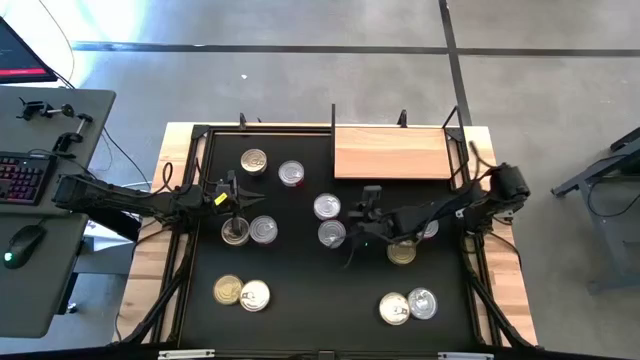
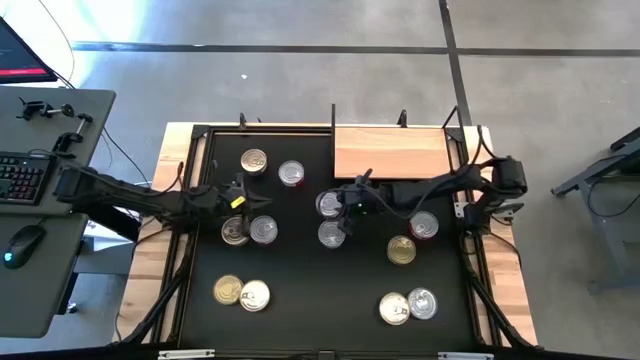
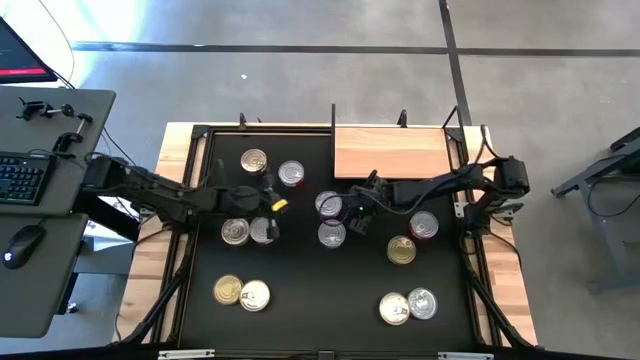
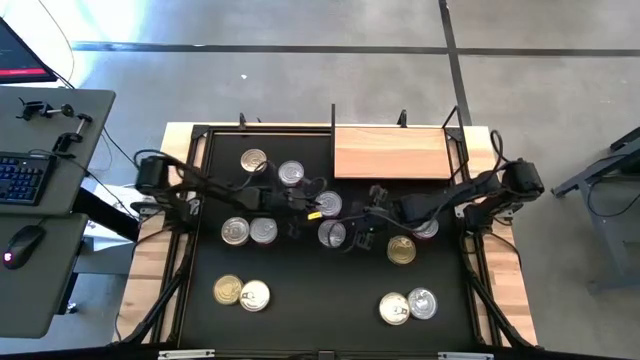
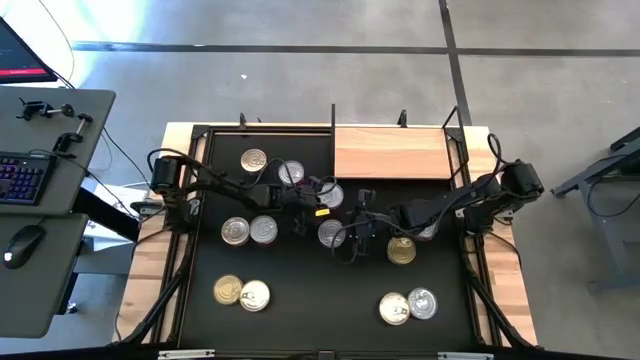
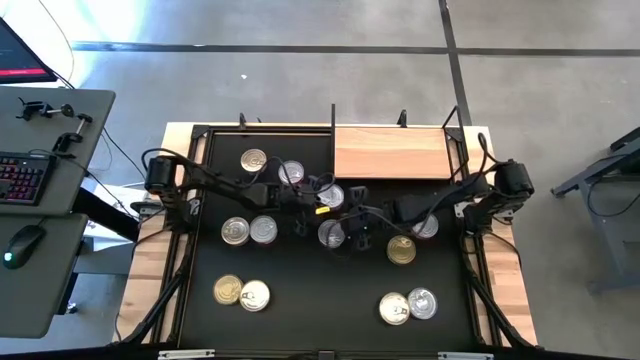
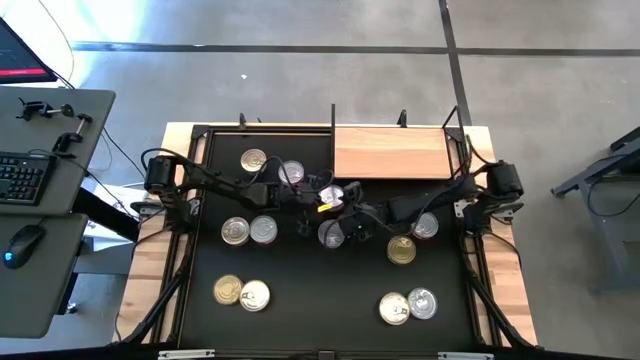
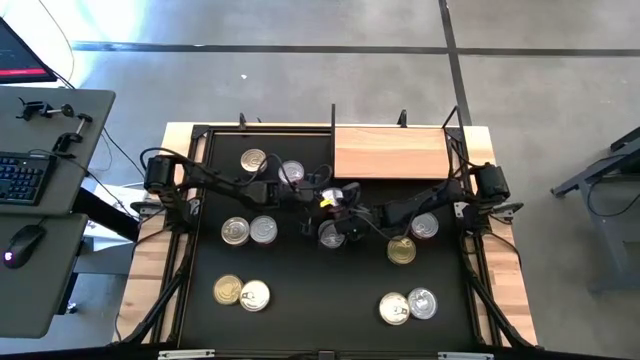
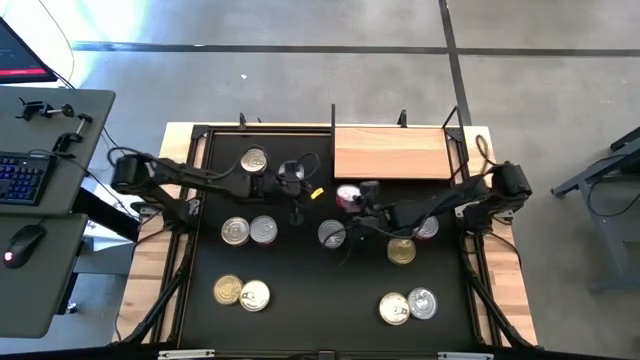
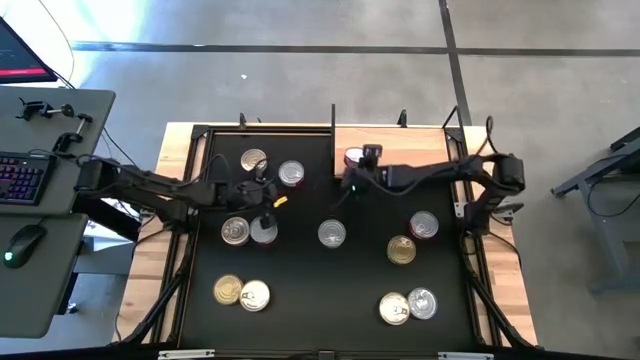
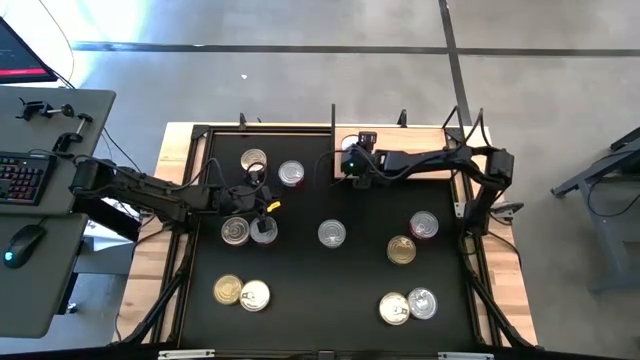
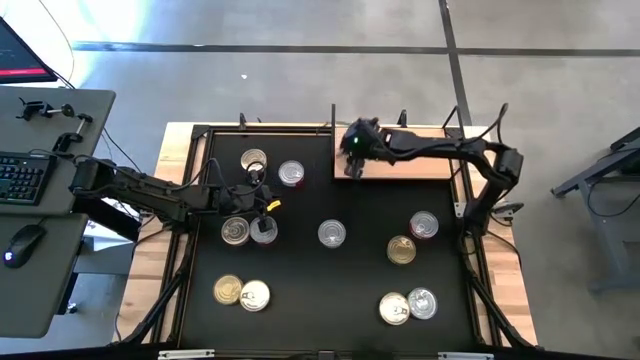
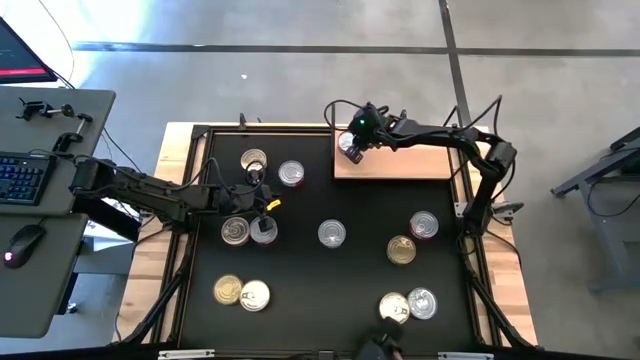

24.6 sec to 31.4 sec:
Task: Stack canned seafood by type on shelf
Put the red tuna can on the shelf

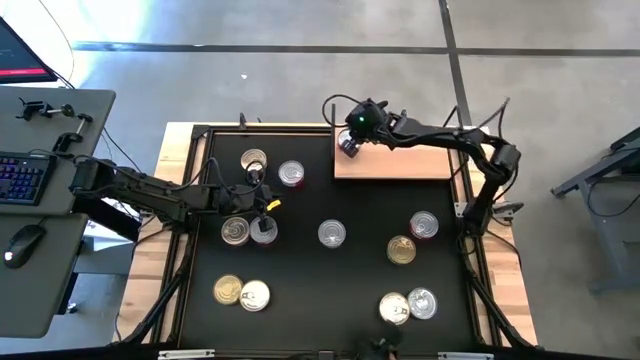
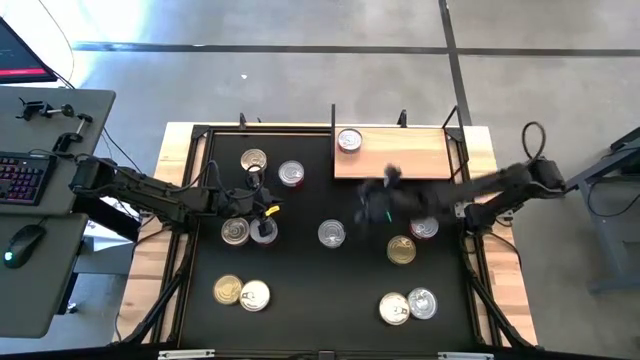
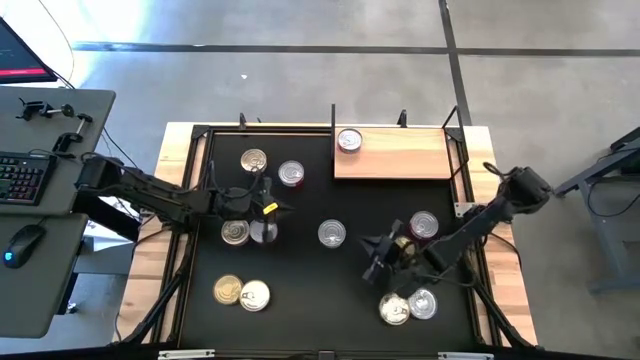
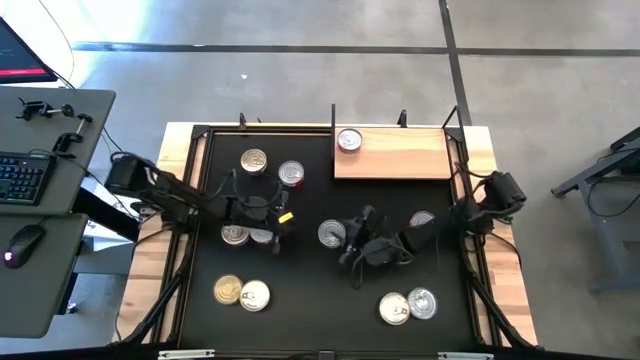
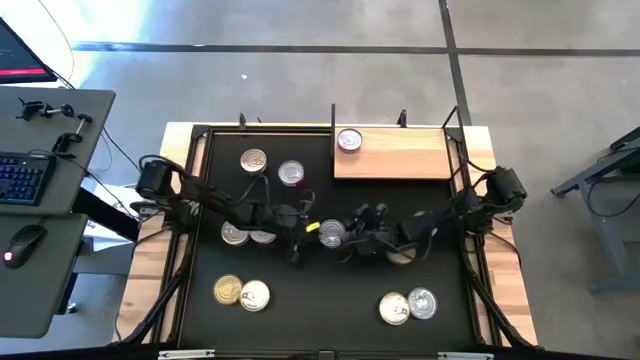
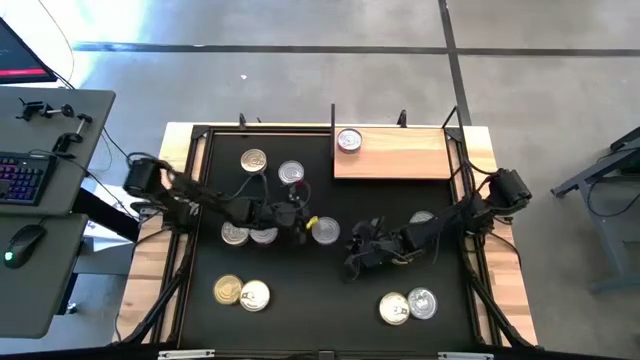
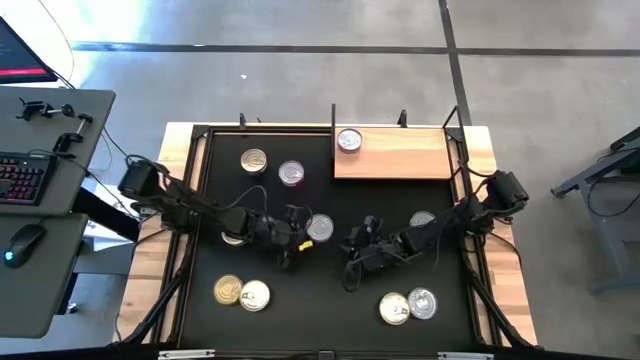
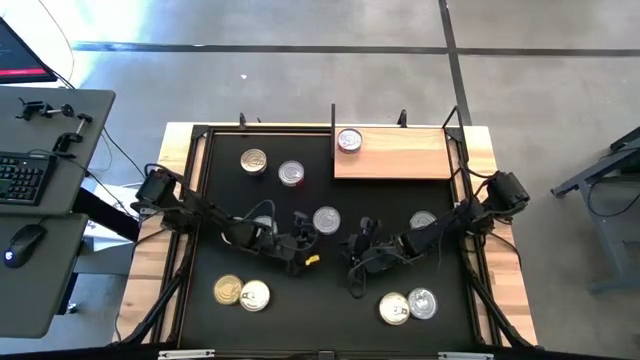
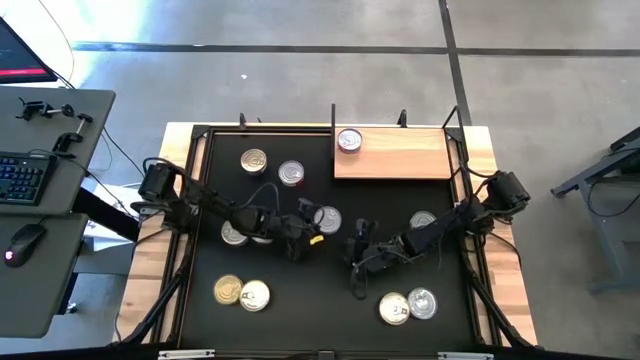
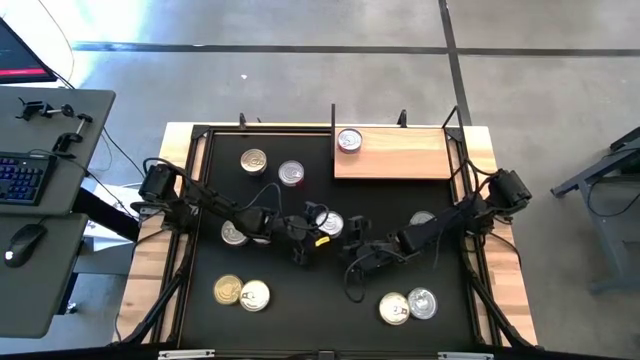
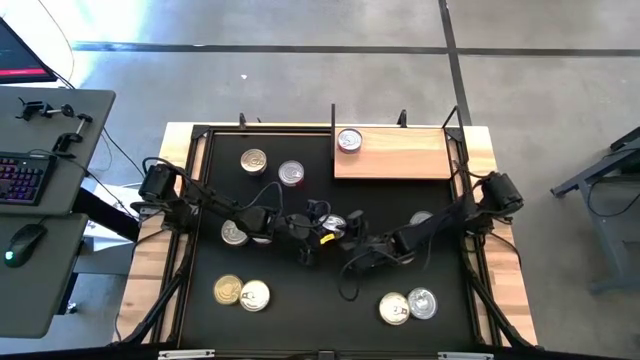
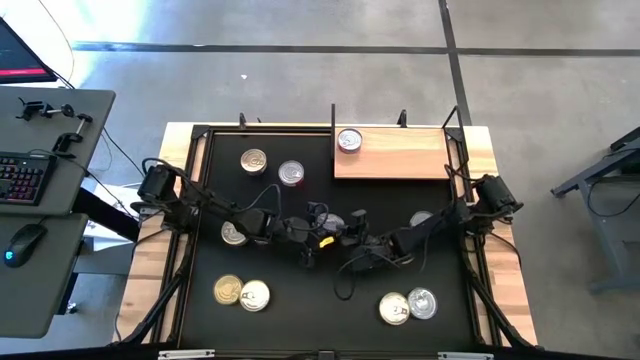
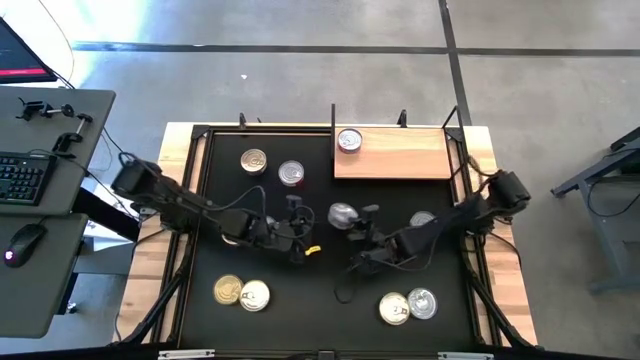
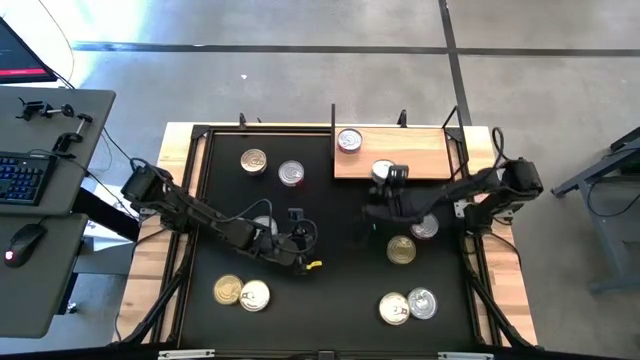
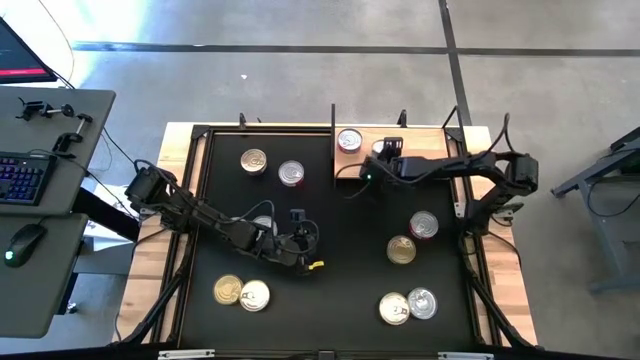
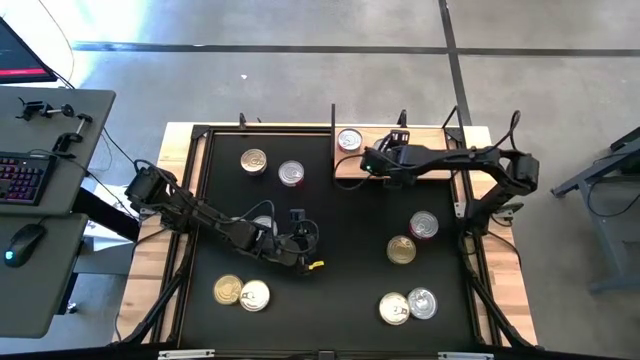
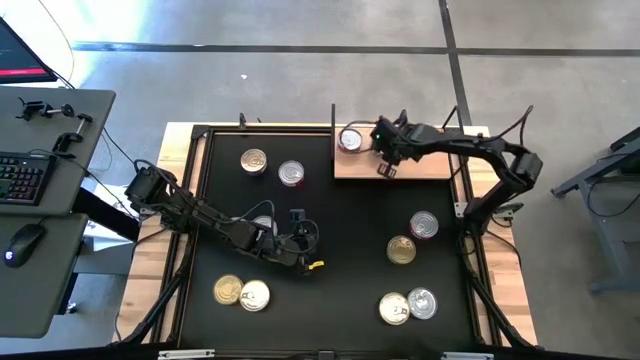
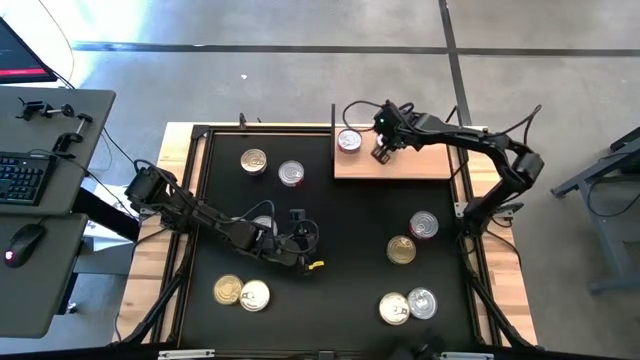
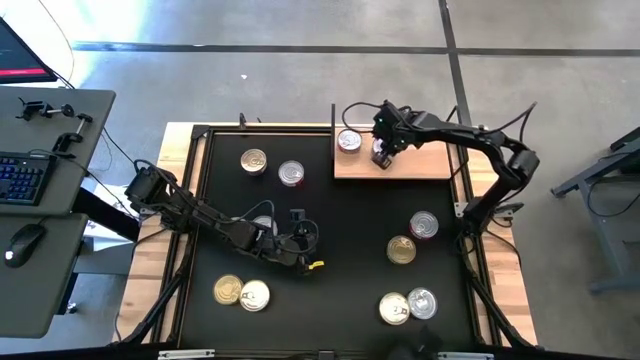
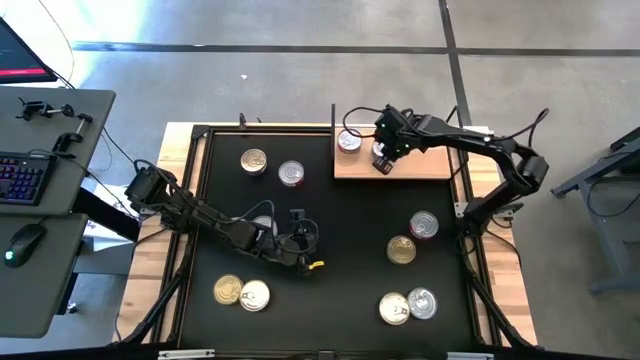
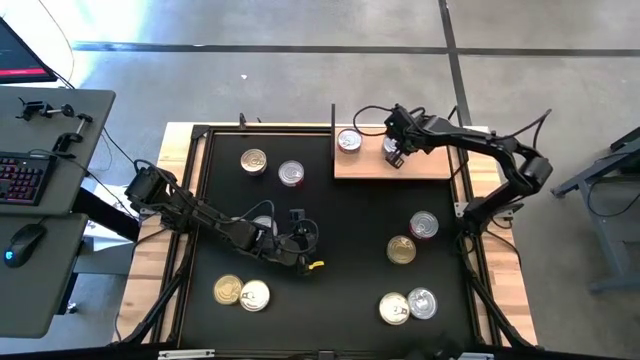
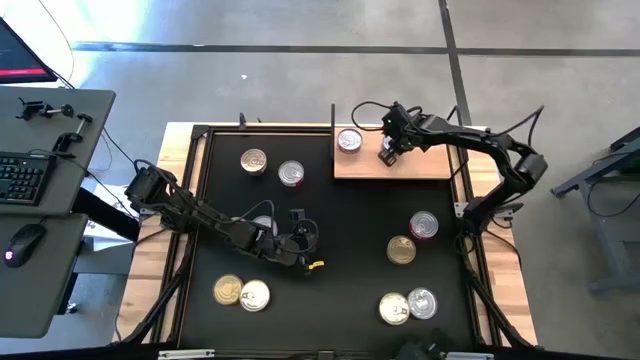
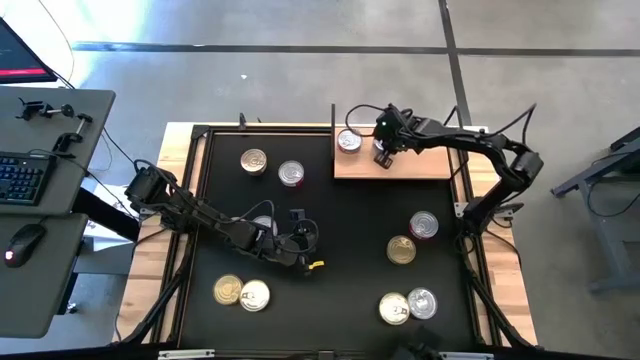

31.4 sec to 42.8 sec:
Put the green tuna can on the shelf
